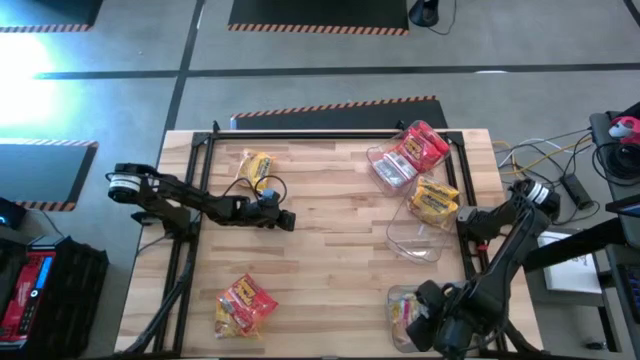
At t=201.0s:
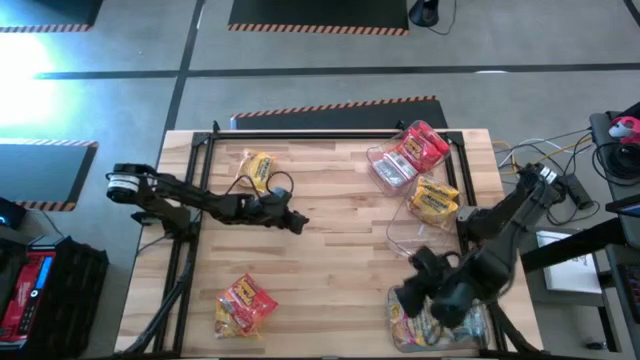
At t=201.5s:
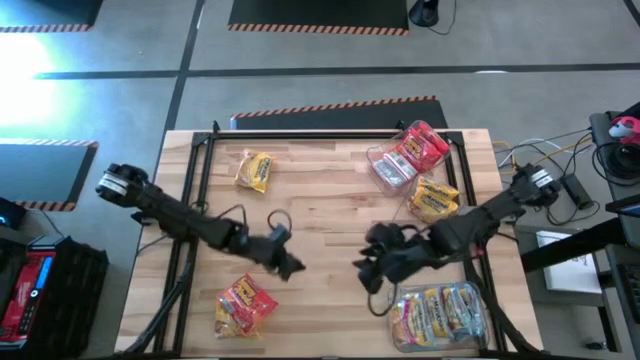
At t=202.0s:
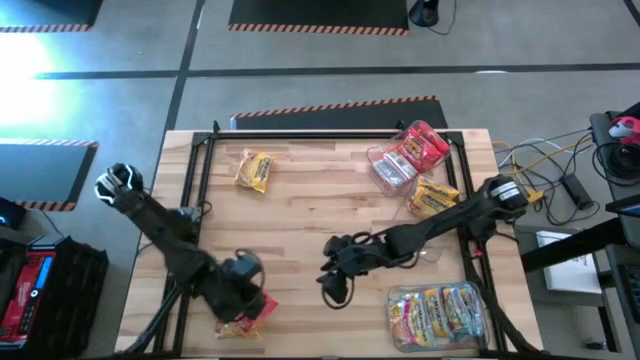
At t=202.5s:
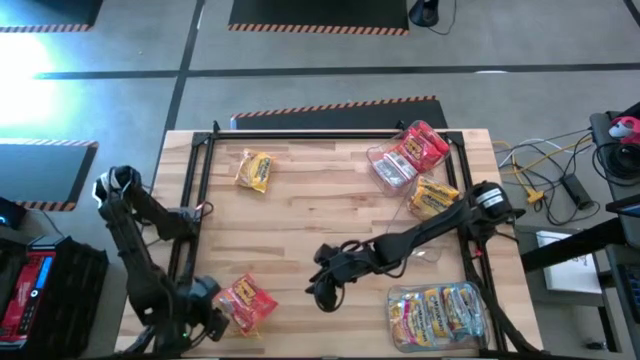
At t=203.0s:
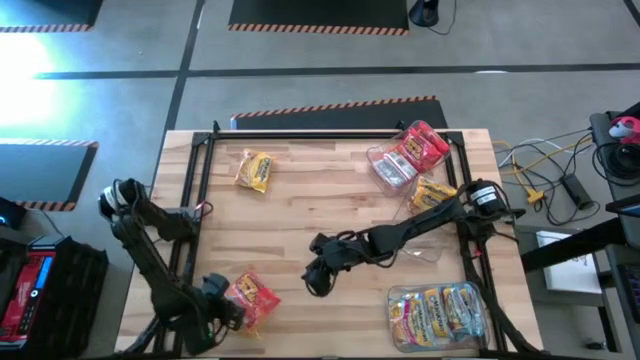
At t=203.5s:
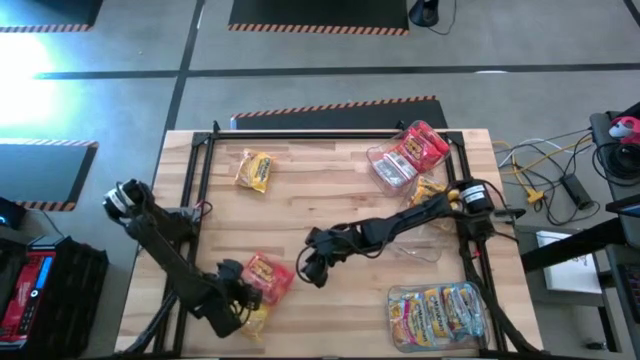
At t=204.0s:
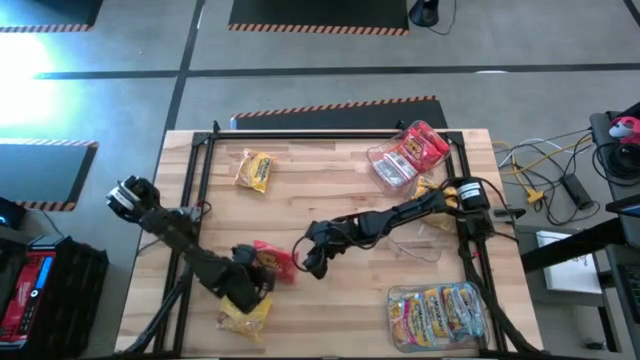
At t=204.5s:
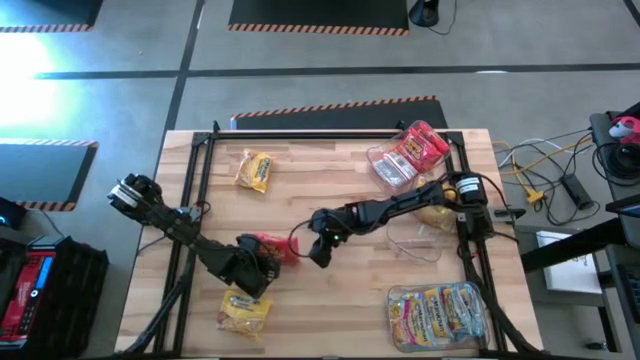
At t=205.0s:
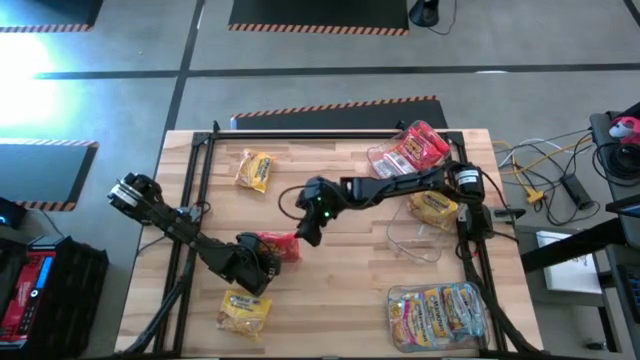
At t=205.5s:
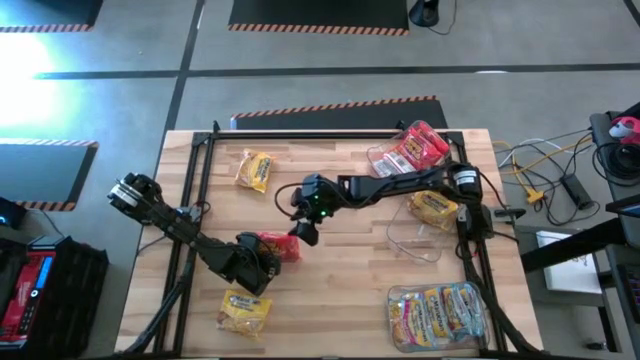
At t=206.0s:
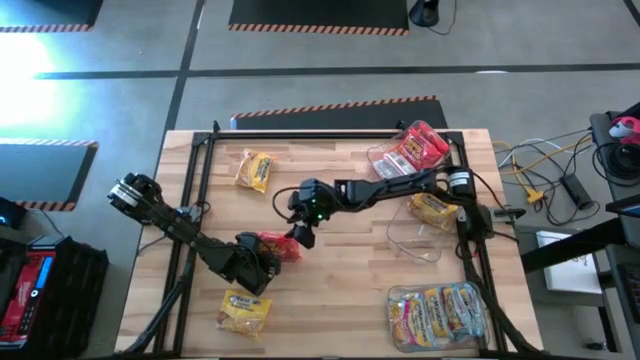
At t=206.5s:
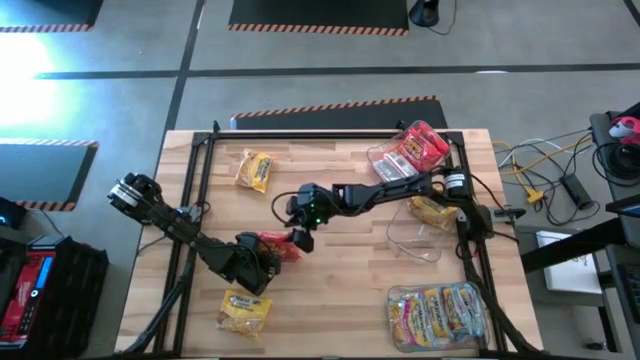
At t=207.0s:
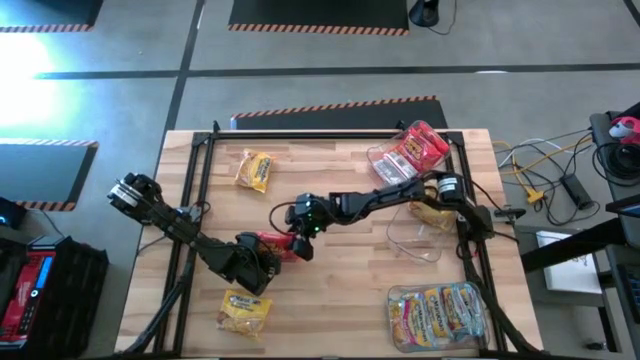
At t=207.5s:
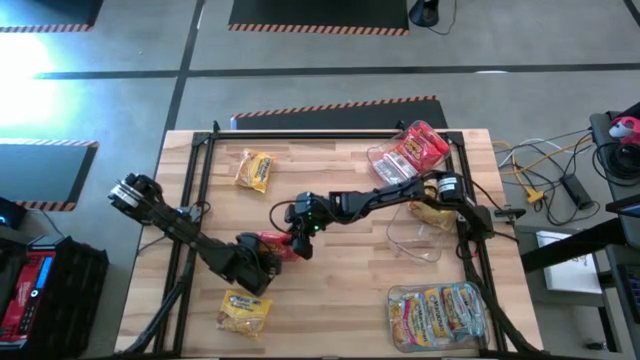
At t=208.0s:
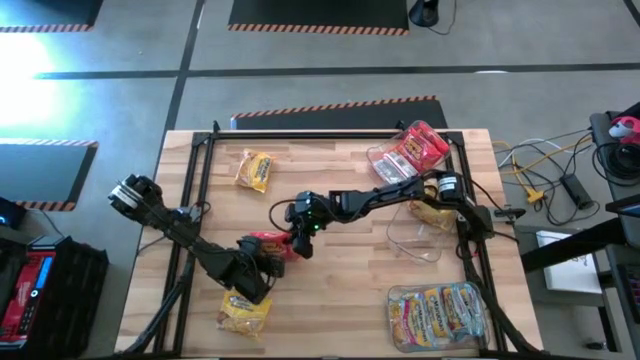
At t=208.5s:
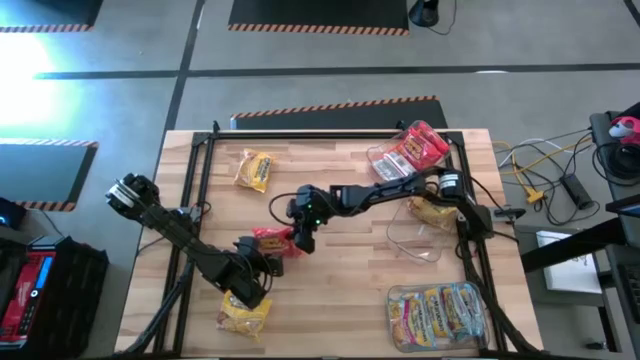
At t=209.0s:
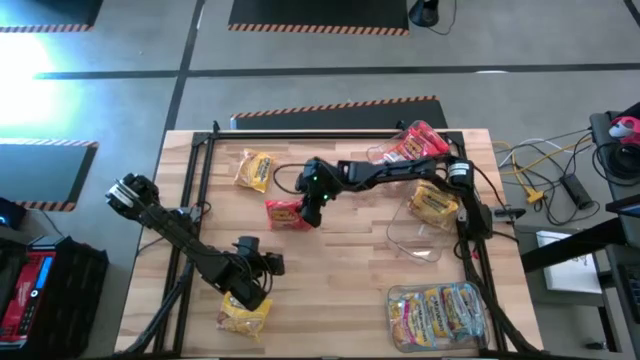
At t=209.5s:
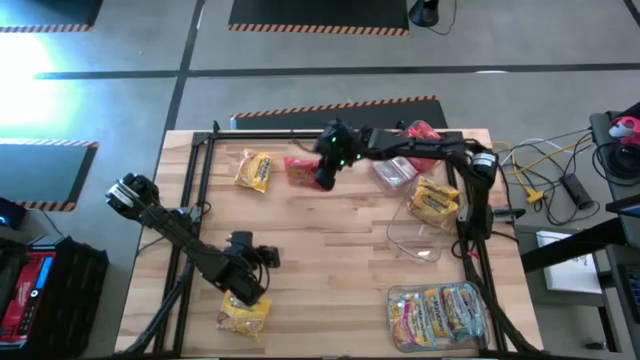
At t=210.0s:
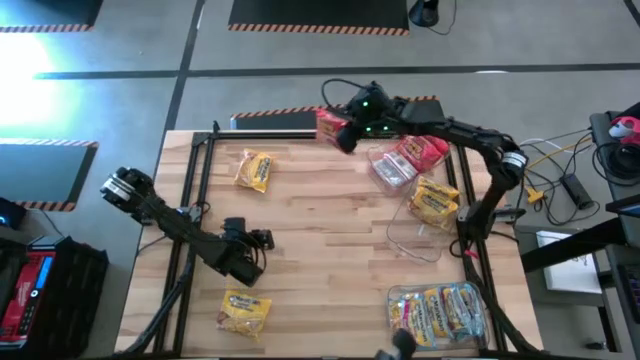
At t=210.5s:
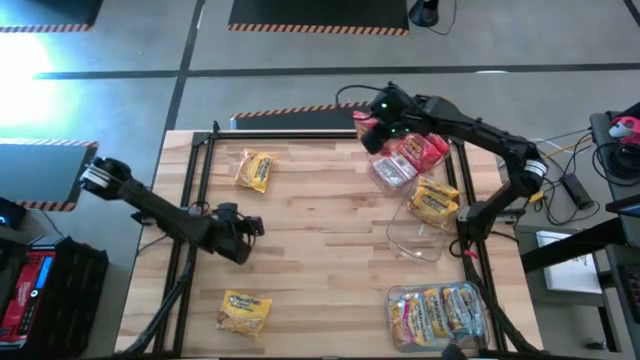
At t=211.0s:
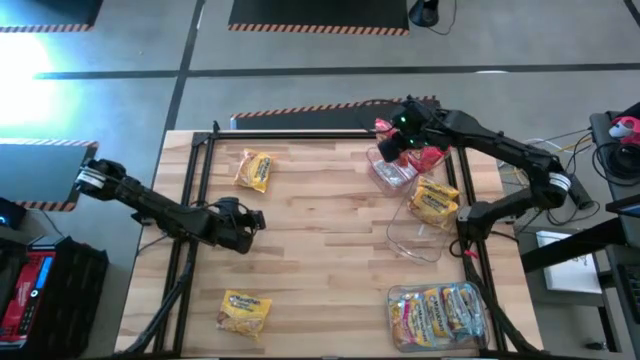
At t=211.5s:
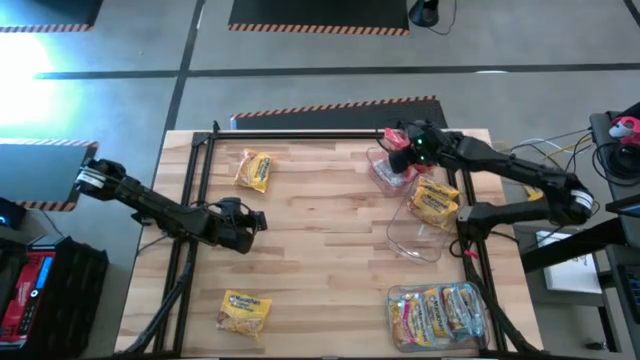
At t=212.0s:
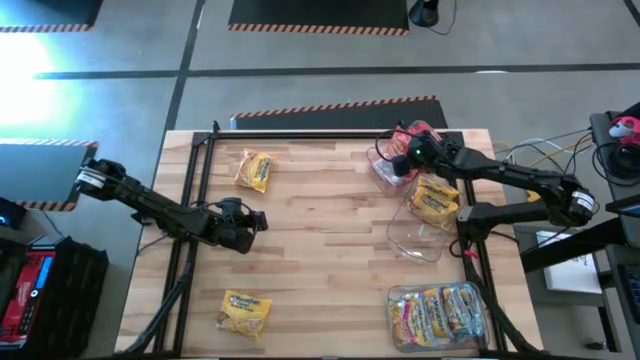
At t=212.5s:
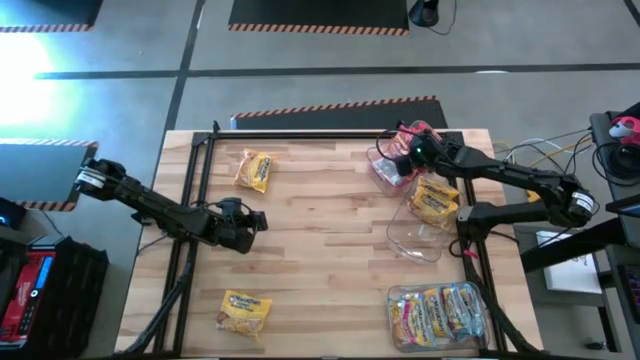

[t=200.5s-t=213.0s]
Task: Sort Maruchan noodles
Put the orange noodle pack into the top transparent bin

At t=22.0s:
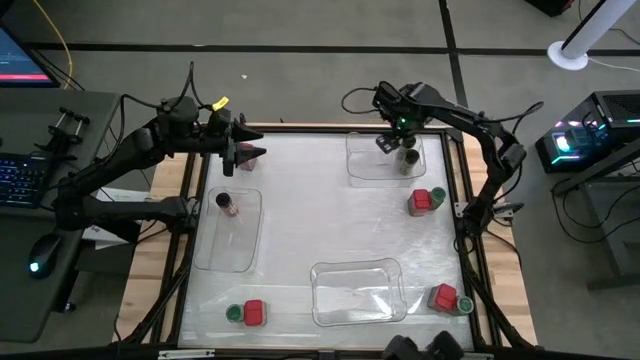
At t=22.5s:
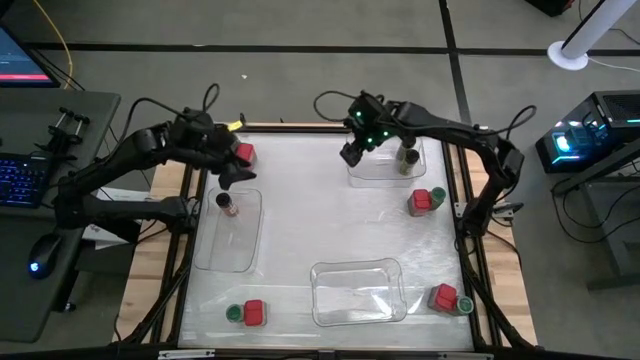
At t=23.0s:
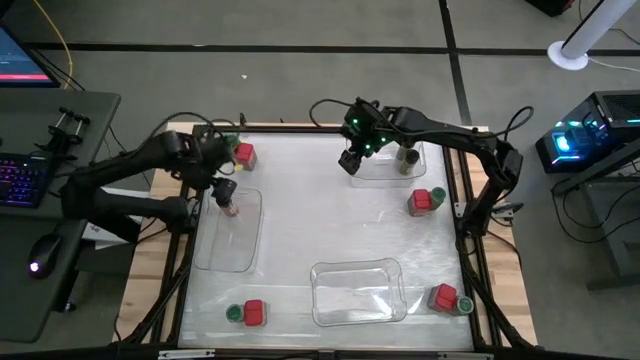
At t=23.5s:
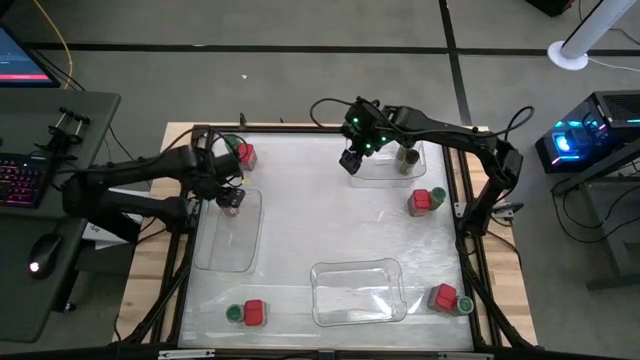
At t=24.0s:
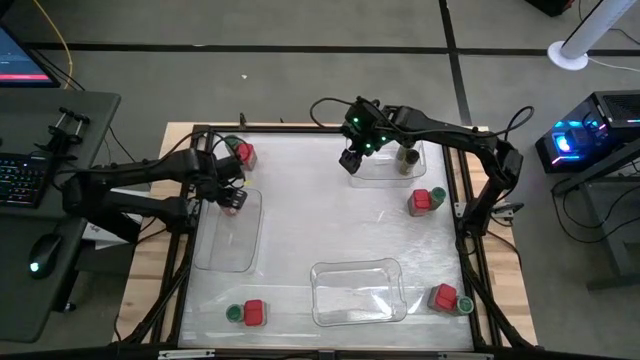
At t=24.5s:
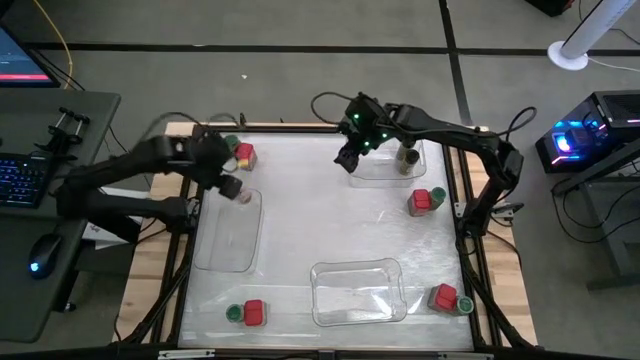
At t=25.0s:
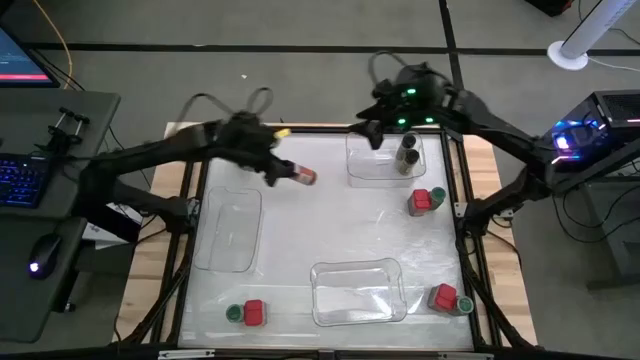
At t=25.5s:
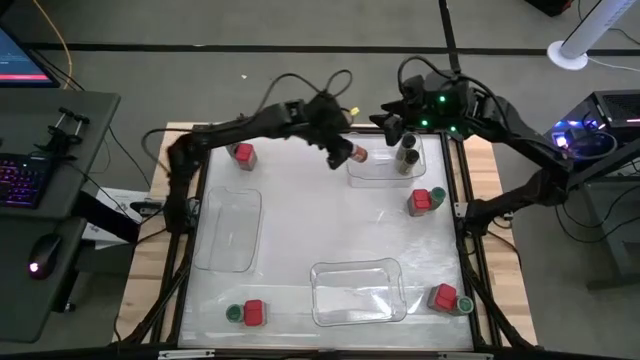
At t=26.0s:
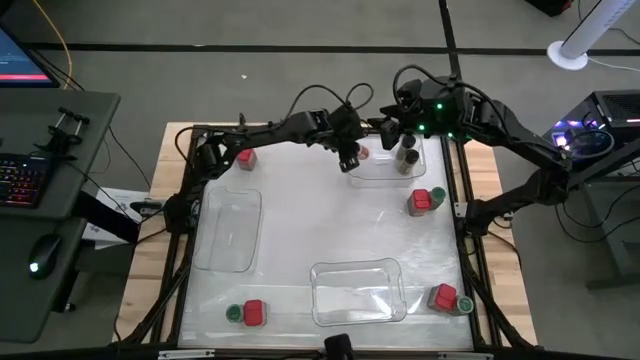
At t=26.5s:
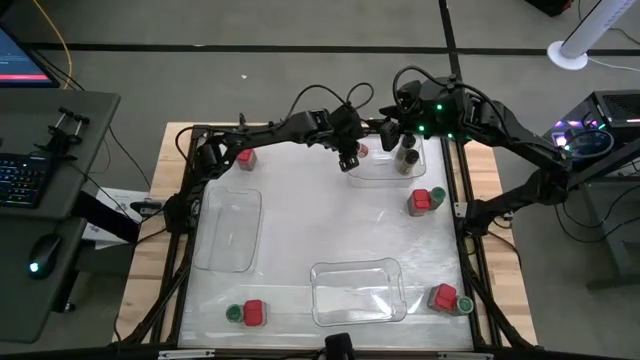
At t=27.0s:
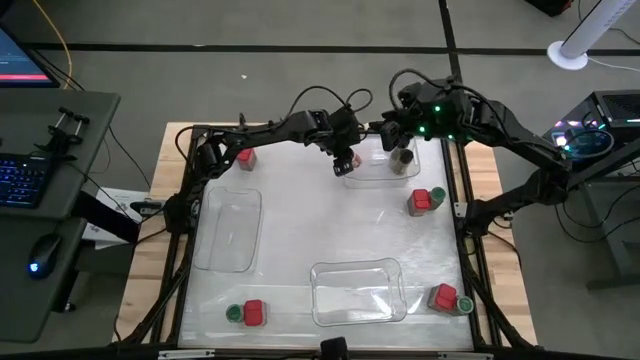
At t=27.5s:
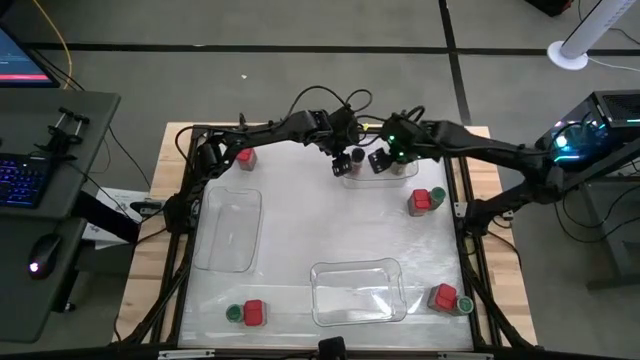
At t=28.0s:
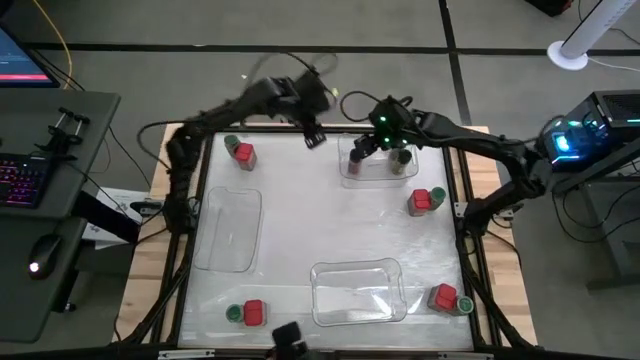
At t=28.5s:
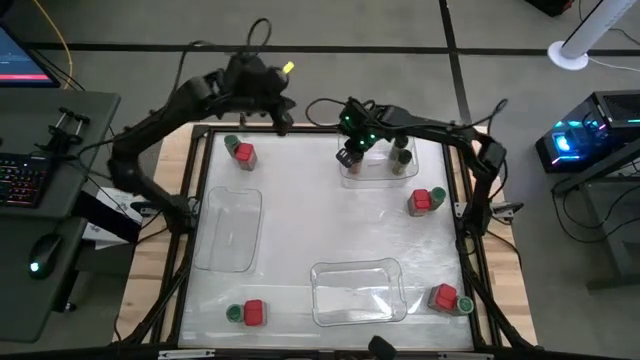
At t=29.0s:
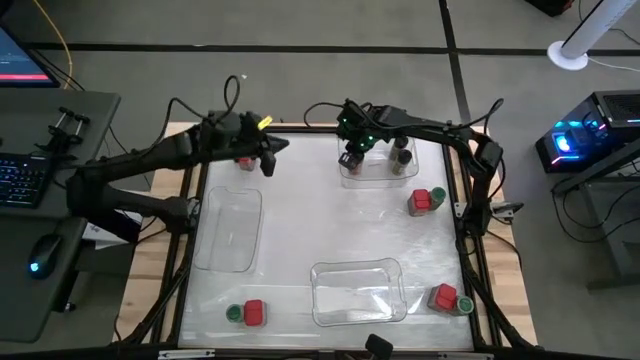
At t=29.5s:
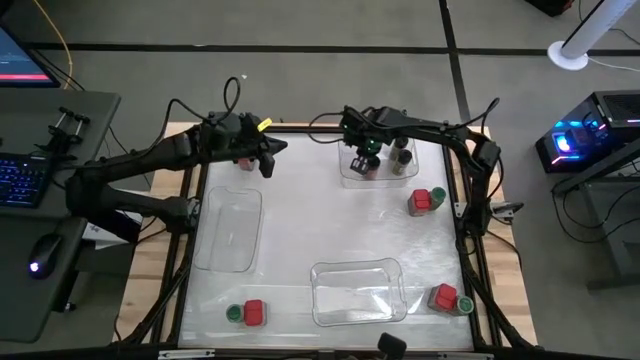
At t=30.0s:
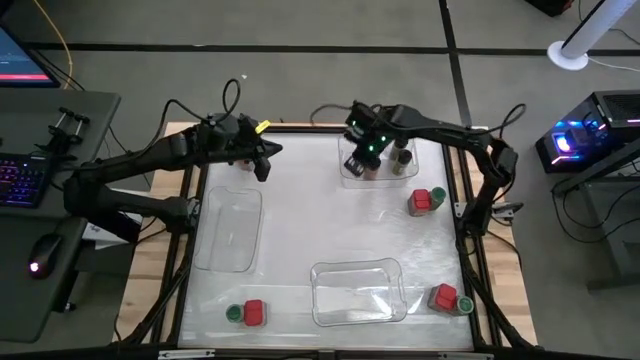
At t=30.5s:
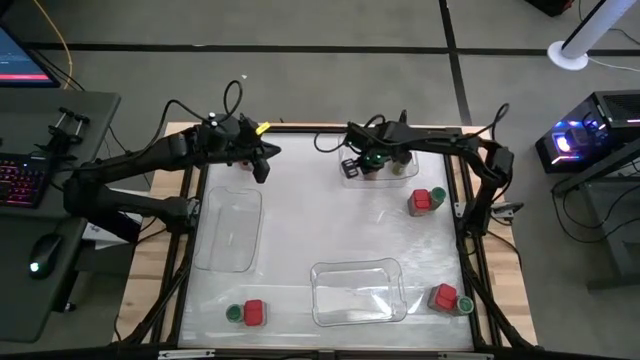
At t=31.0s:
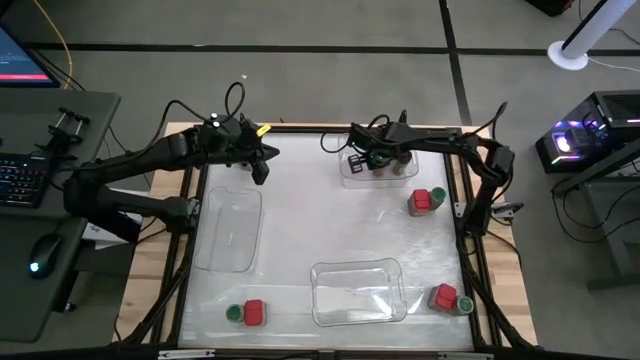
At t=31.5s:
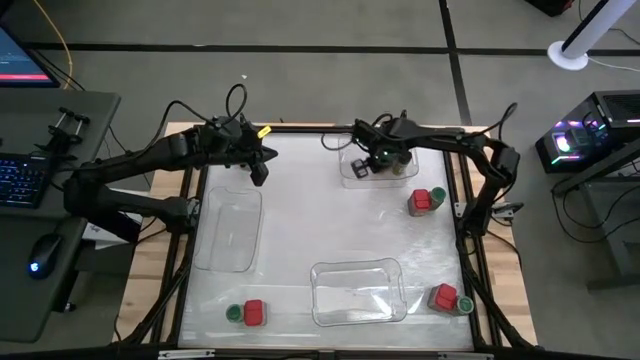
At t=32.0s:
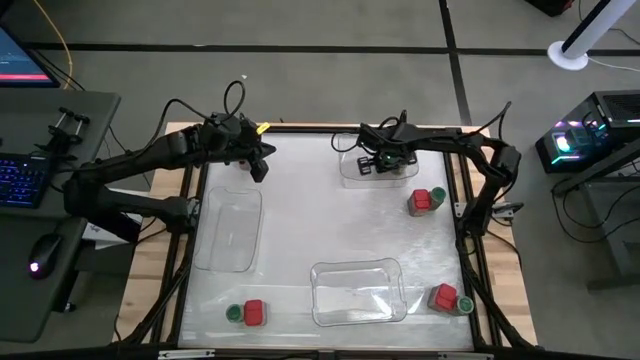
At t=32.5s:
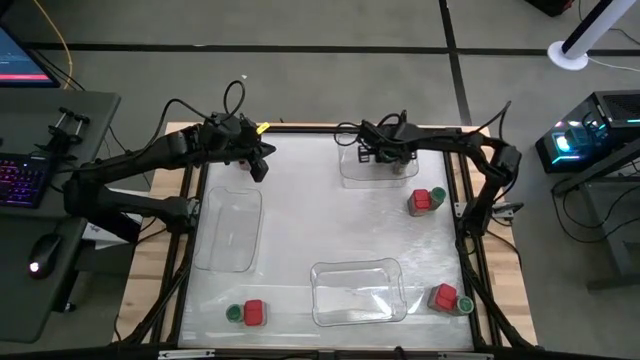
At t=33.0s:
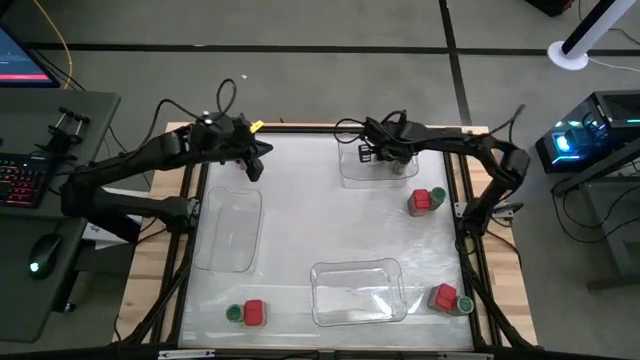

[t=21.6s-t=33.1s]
Task: Sort spices by type
Put the black seasoning bottle into the top right transparent bin
